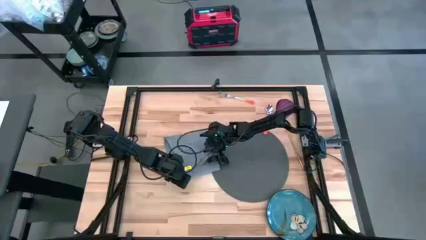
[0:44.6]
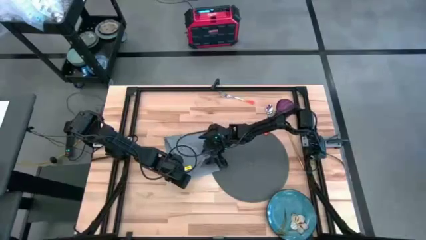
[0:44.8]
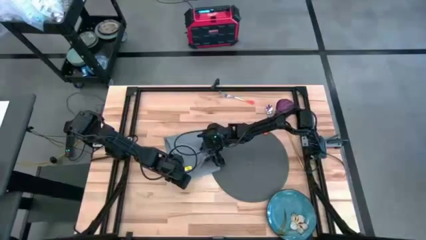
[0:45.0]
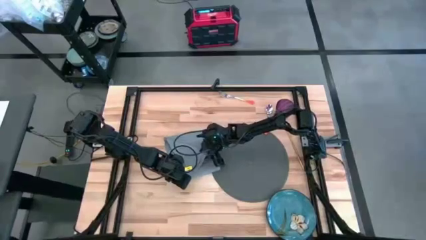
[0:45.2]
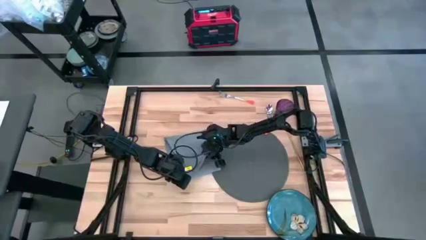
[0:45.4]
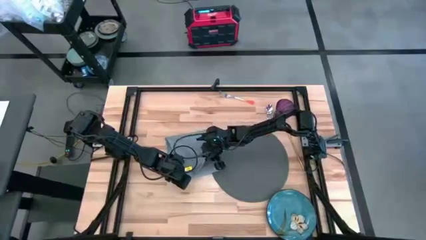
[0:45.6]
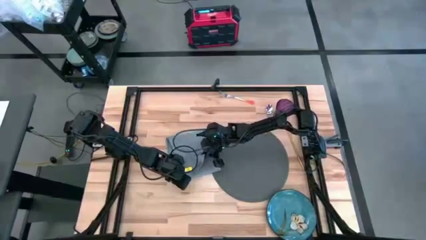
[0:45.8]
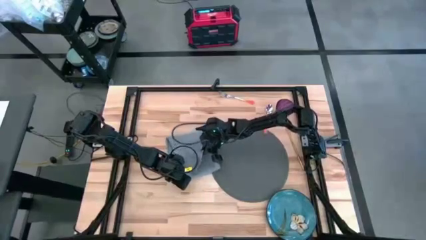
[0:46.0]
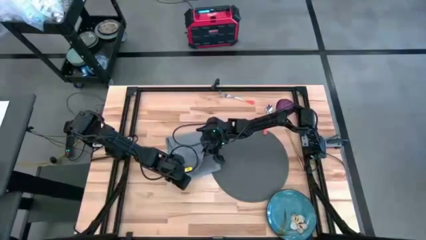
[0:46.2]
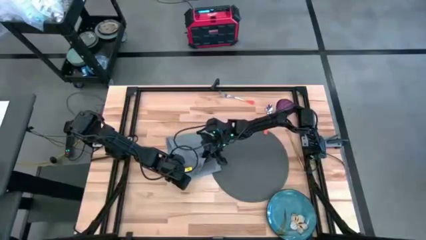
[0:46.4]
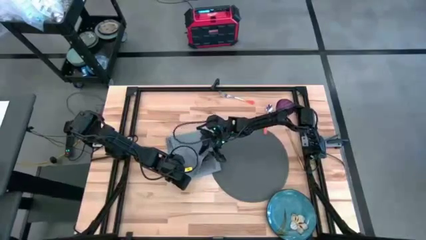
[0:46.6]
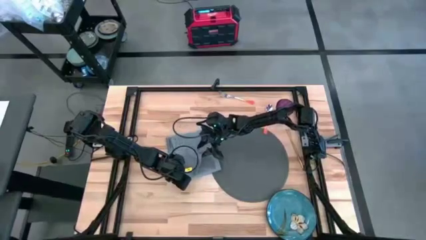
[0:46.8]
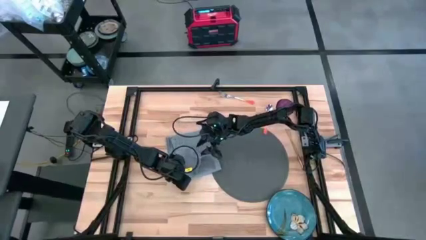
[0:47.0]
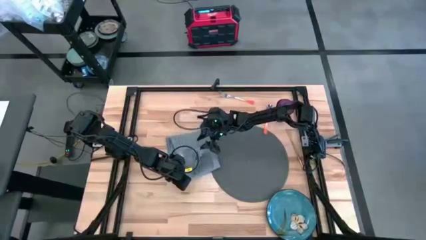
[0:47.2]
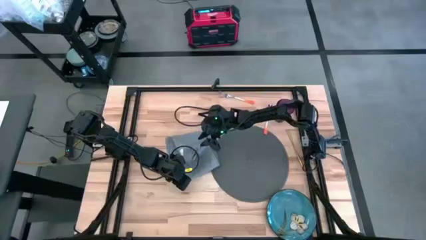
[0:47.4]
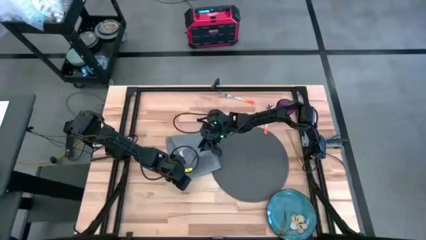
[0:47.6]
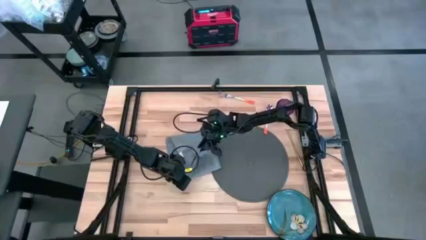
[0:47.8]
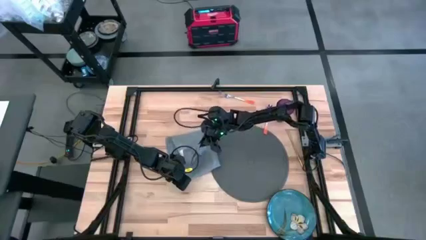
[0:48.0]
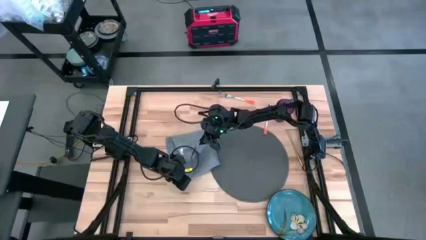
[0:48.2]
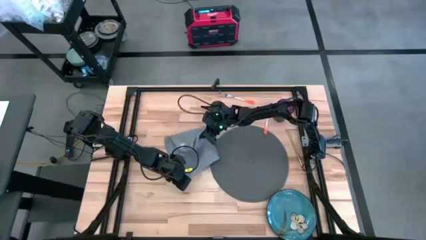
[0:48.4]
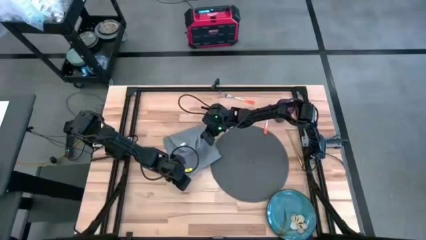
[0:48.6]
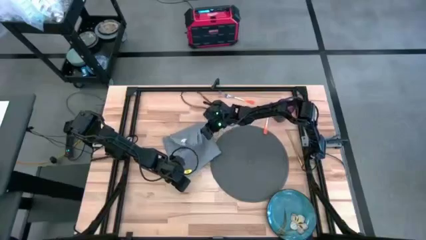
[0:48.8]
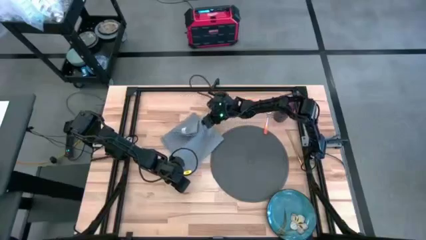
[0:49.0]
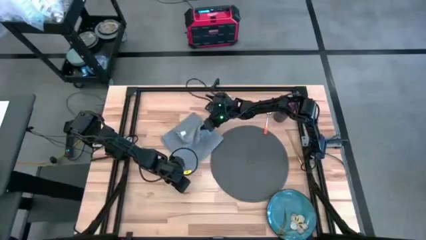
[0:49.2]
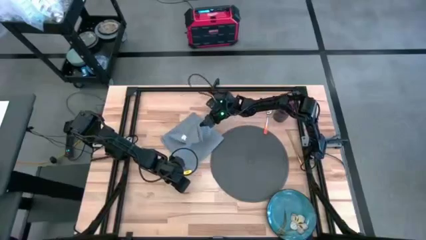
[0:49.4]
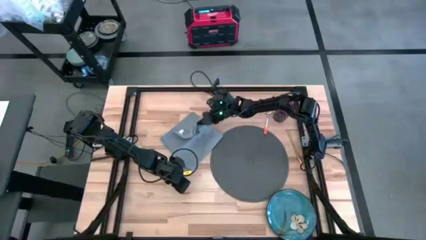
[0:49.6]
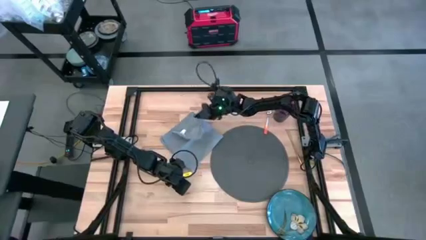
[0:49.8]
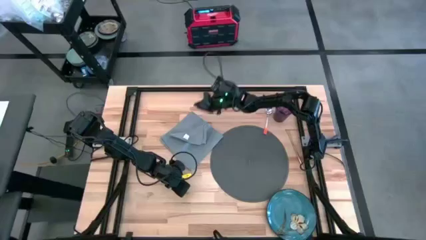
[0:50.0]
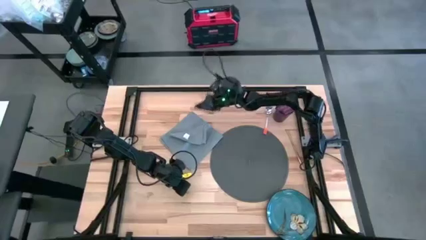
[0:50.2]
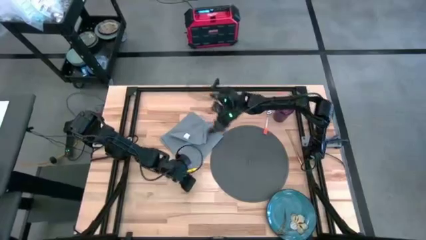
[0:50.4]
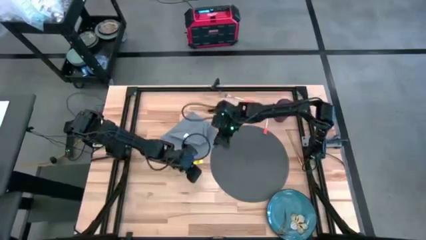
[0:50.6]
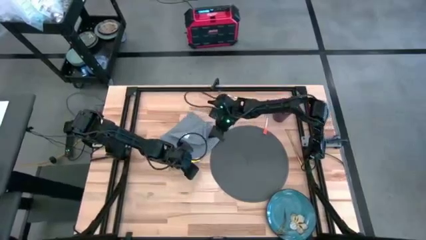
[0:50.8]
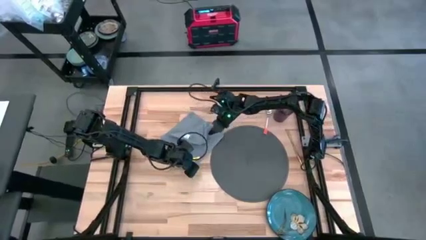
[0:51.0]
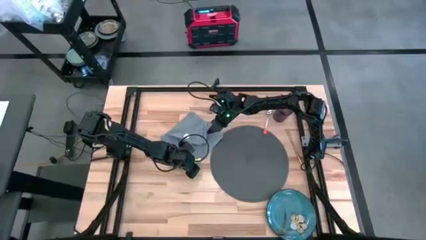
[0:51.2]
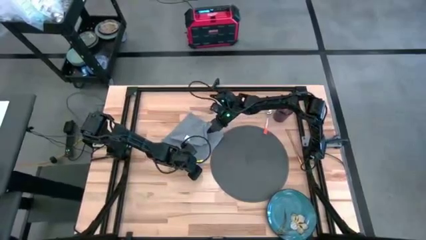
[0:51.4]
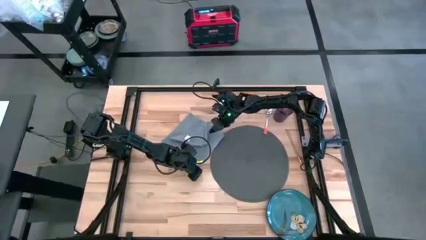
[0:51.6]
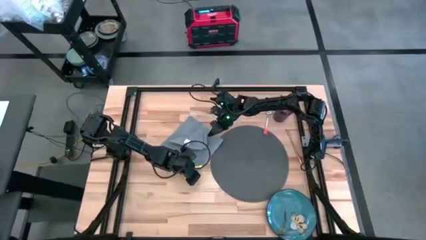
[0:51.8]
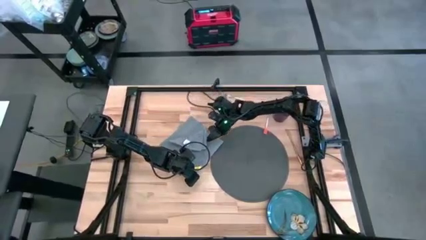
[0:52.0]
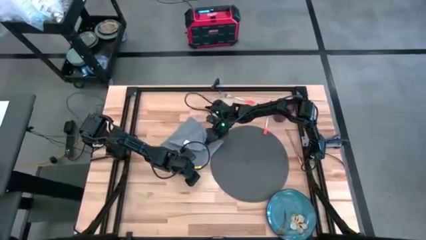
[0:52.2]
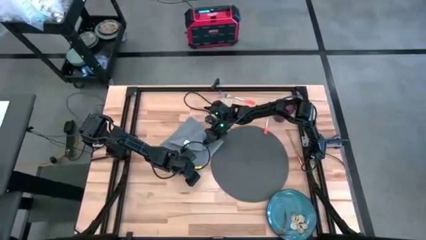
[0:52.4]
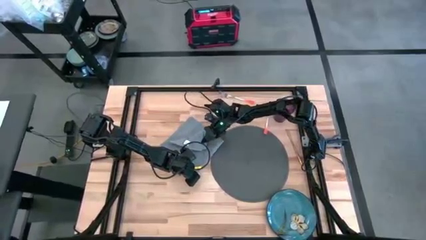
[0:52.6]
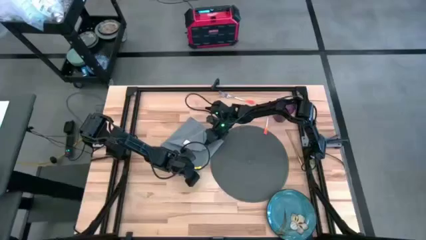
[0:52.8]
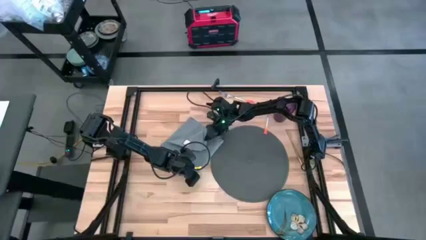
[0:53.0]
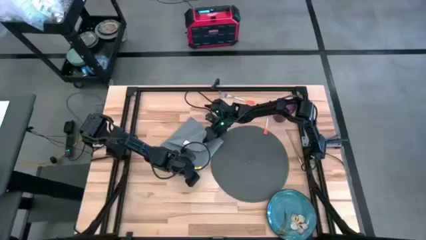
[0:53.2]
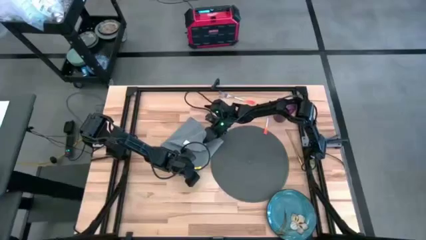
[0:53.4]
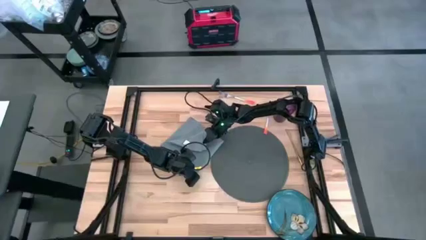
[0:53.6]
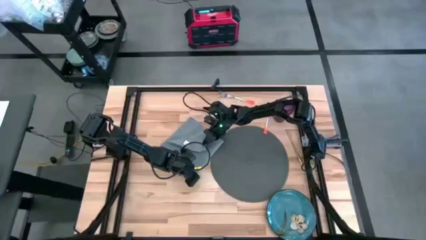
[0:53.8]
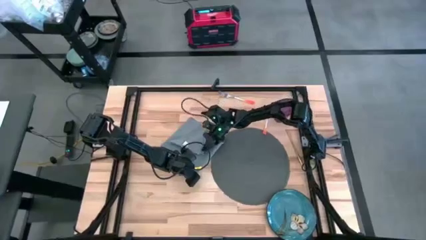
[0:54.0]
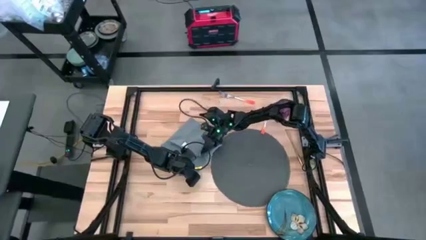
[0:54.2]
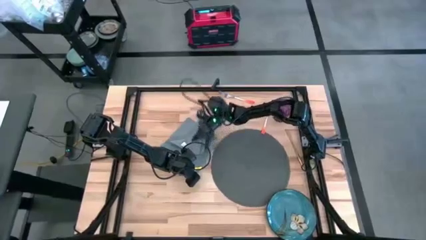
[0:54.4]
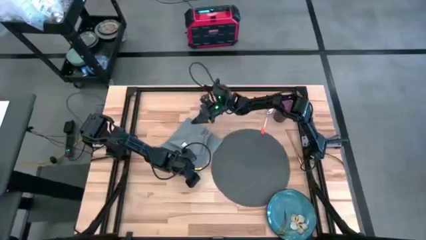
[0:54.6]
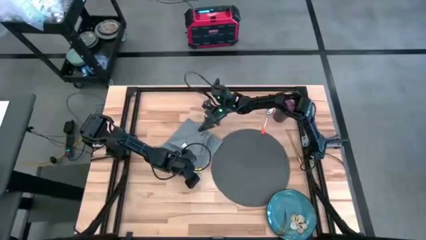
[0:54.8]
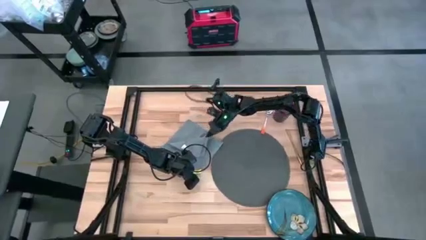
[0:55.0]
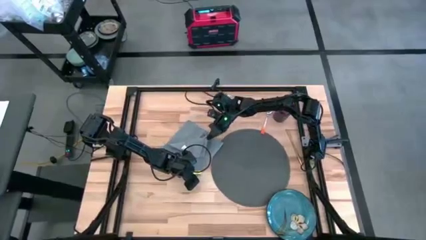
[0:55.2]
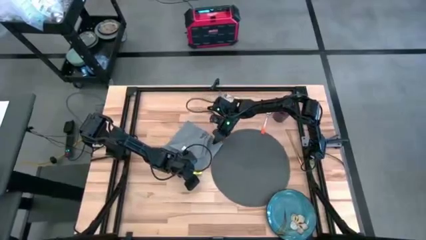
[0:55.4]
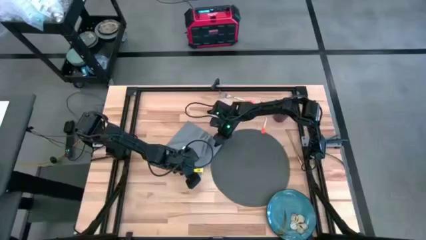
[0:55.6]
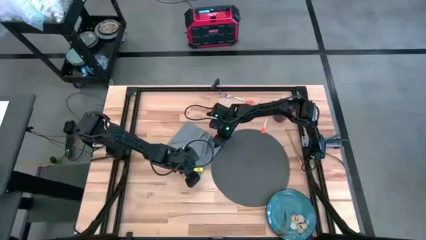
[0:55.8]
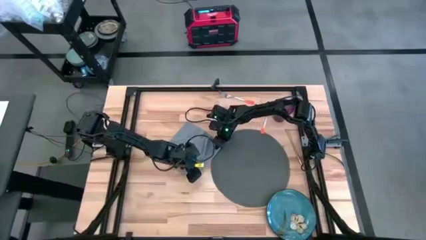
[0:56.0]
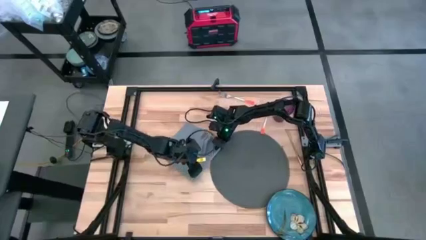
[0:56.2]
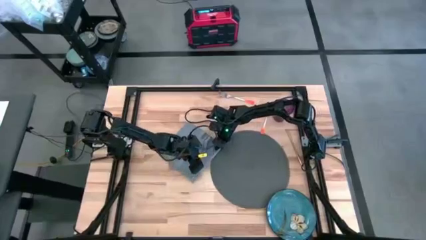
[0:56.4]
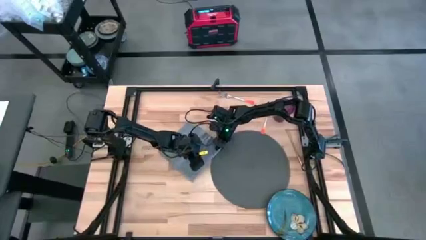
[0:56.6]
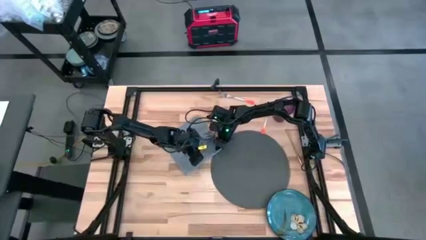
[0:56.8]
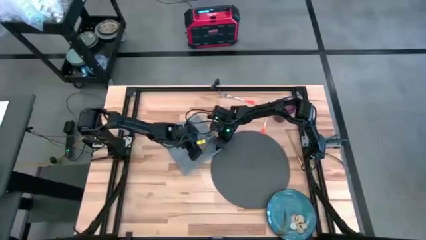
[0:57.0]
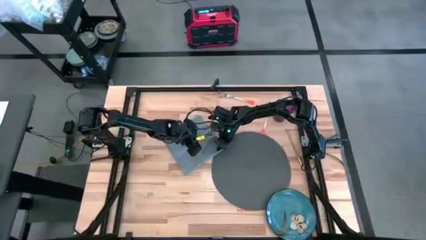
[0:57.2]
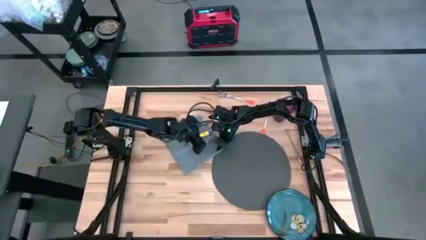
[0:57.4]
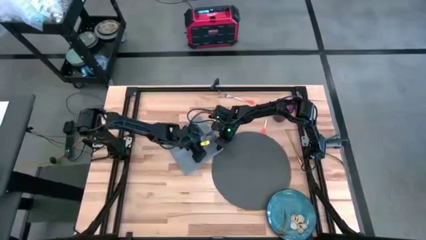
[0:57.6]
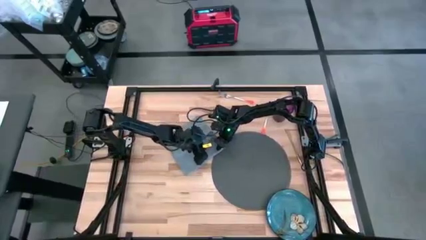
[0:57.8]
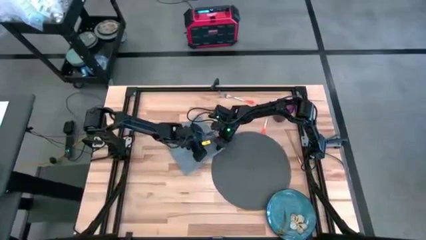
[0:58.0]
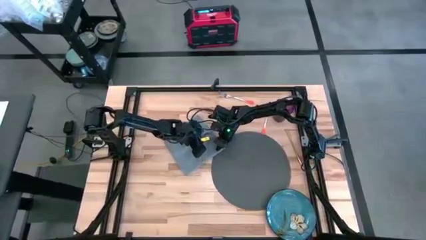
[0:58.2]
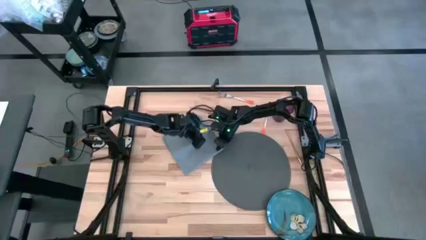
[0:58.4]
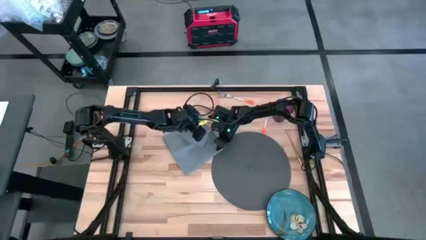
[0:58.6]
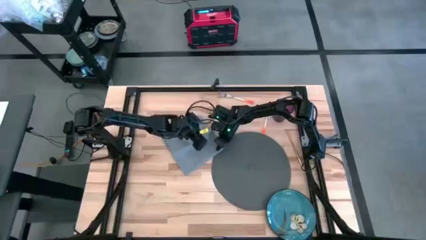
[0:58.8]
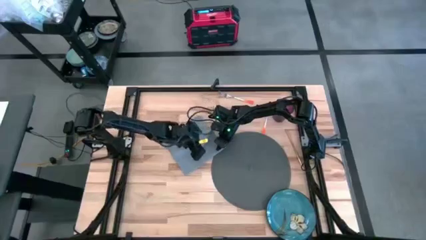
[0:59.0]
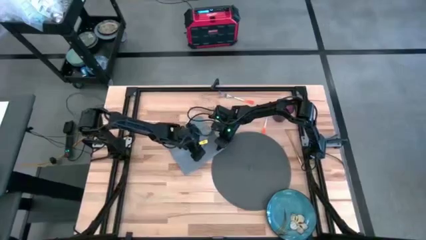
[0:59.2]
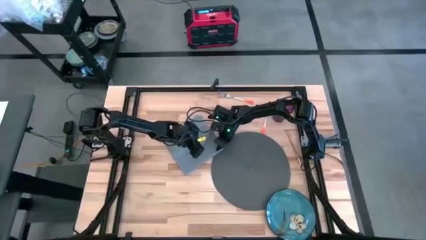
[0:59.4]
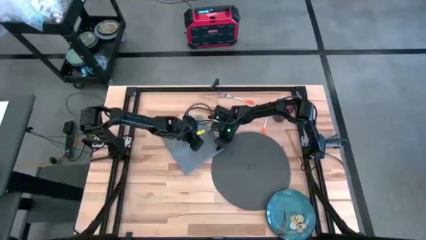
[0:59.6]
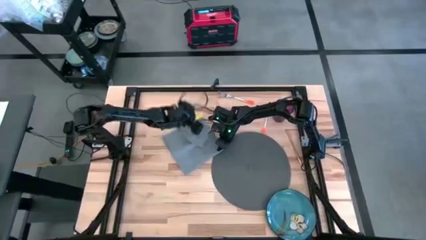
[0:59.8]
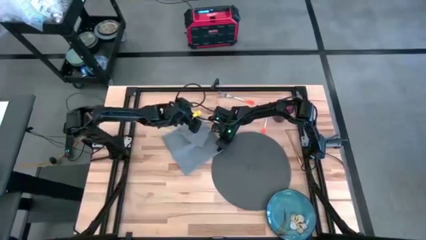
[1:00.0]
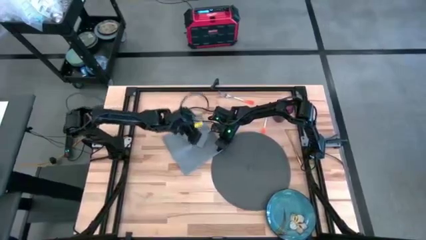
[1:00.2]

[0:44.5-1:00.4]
Task: Set table place
Fold the light gray table napkin on the table
